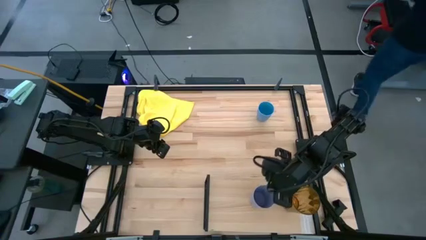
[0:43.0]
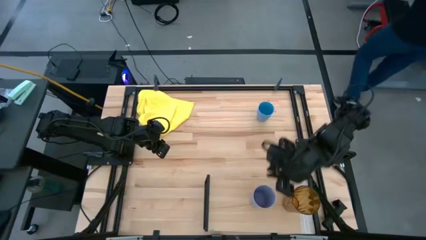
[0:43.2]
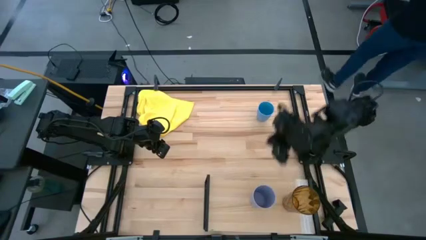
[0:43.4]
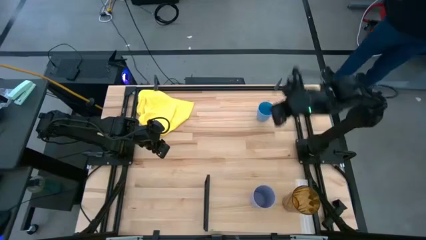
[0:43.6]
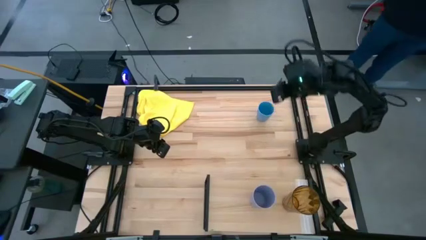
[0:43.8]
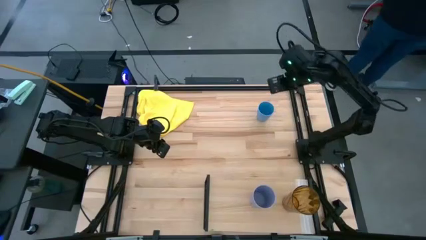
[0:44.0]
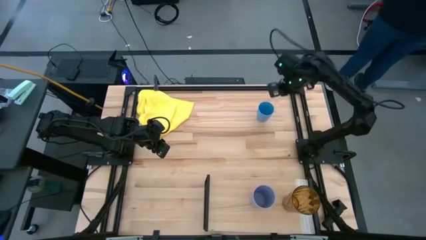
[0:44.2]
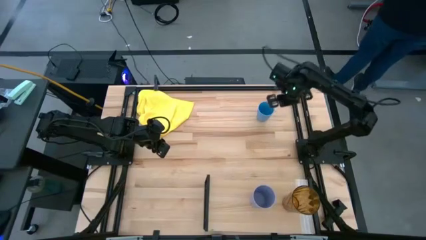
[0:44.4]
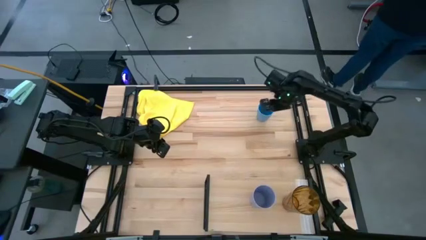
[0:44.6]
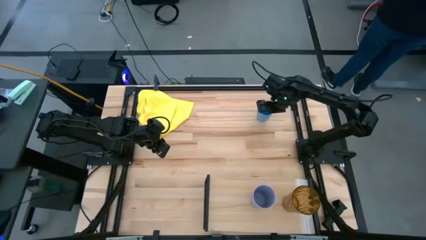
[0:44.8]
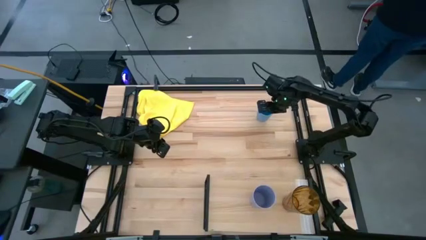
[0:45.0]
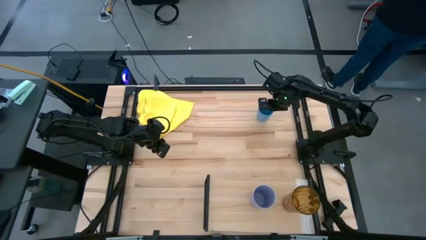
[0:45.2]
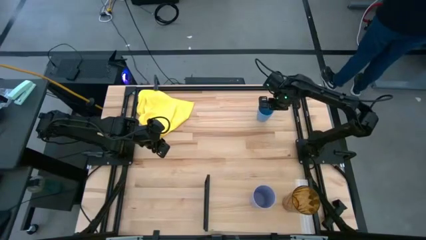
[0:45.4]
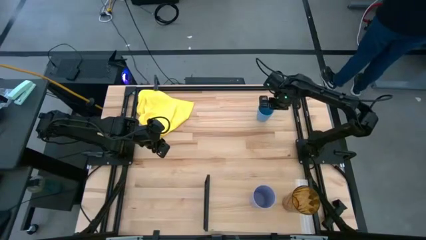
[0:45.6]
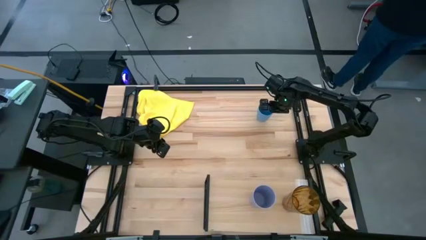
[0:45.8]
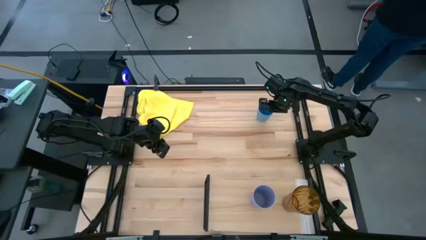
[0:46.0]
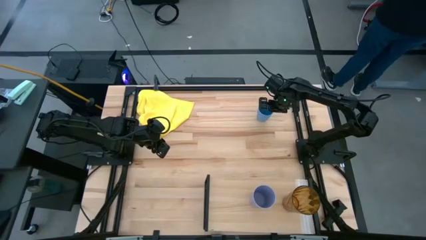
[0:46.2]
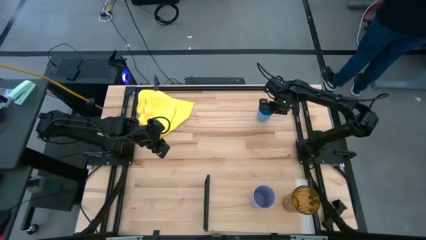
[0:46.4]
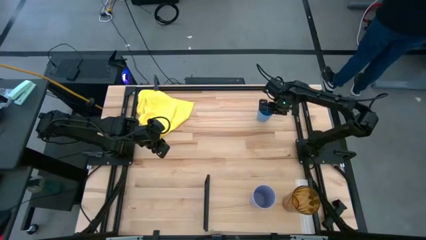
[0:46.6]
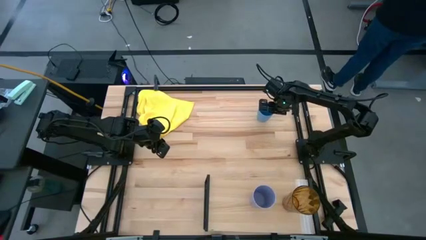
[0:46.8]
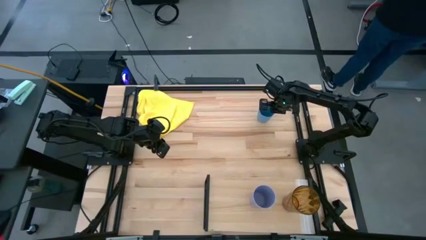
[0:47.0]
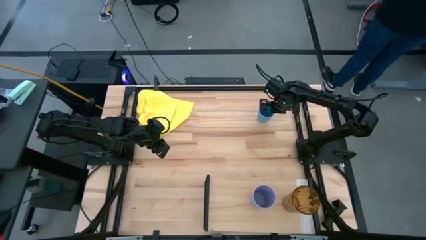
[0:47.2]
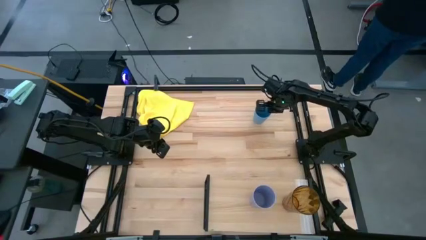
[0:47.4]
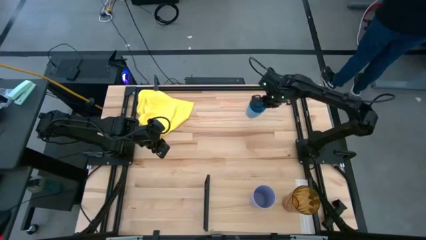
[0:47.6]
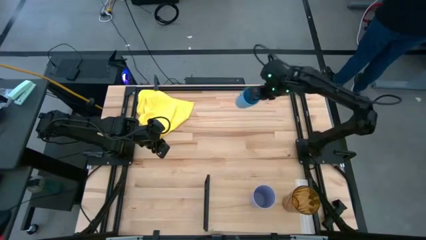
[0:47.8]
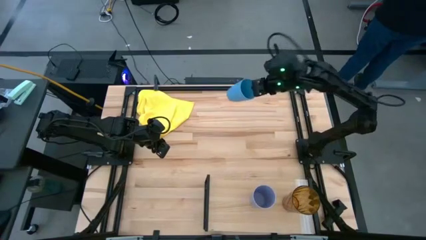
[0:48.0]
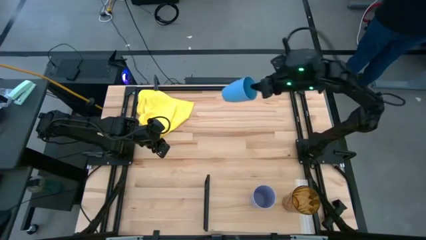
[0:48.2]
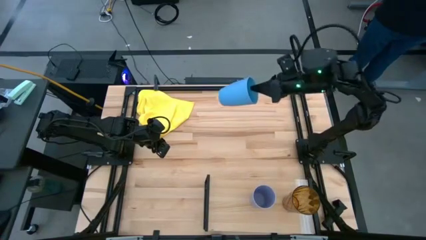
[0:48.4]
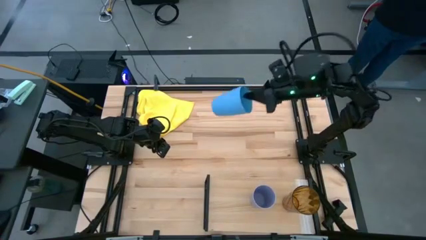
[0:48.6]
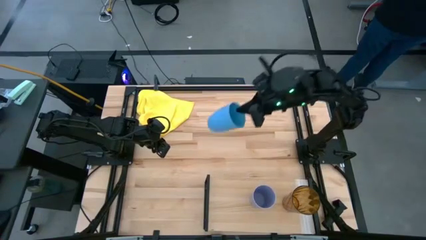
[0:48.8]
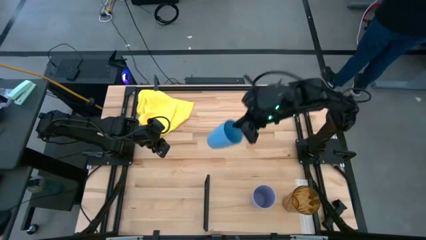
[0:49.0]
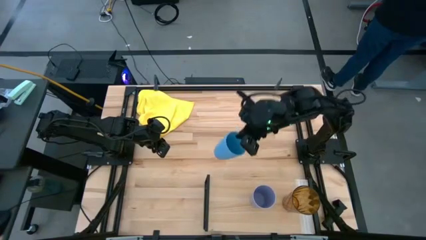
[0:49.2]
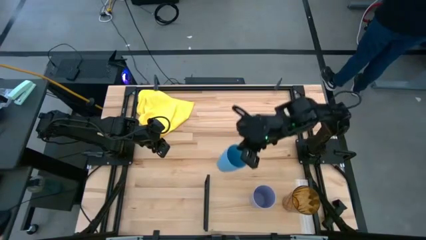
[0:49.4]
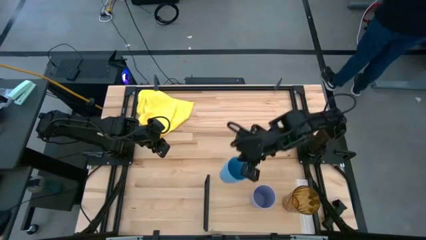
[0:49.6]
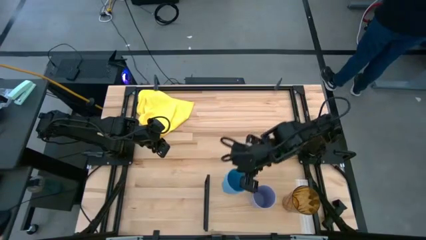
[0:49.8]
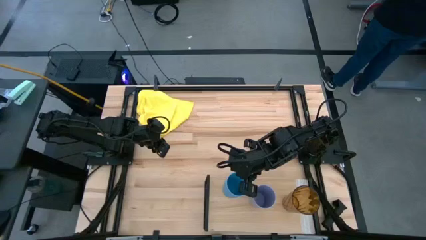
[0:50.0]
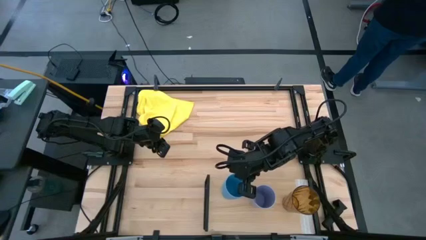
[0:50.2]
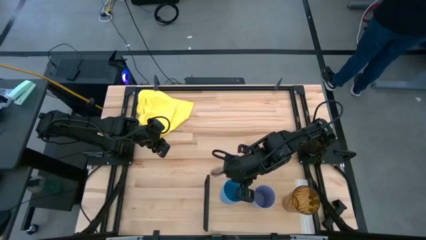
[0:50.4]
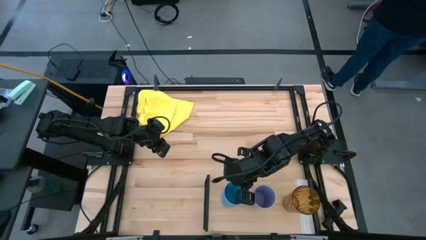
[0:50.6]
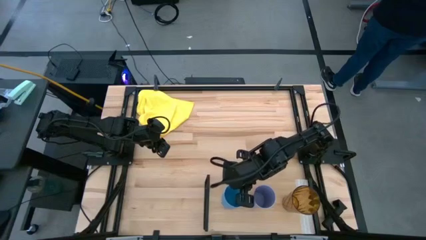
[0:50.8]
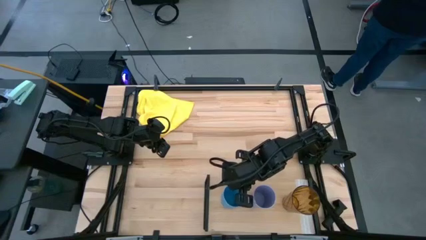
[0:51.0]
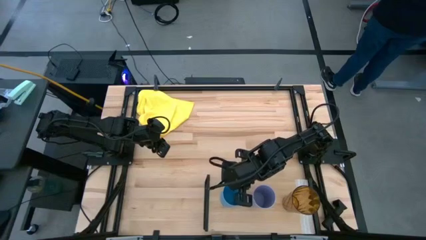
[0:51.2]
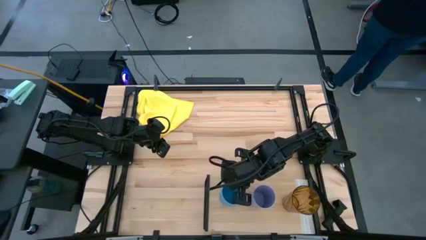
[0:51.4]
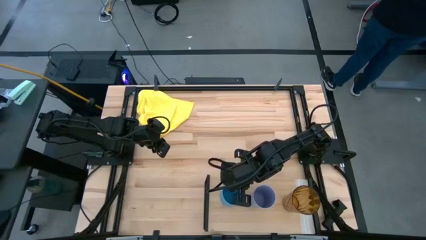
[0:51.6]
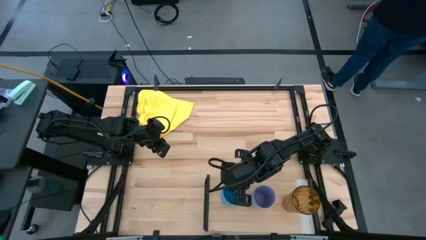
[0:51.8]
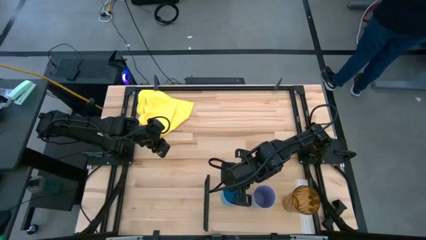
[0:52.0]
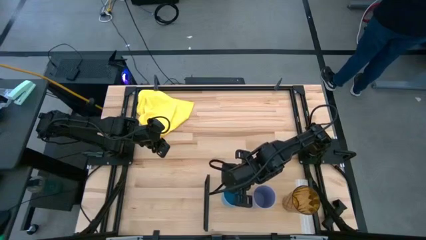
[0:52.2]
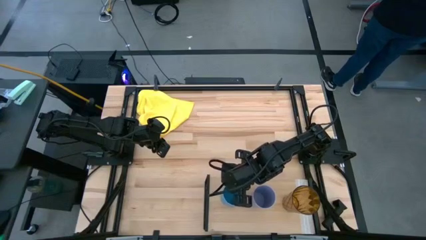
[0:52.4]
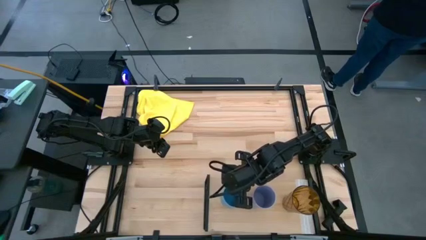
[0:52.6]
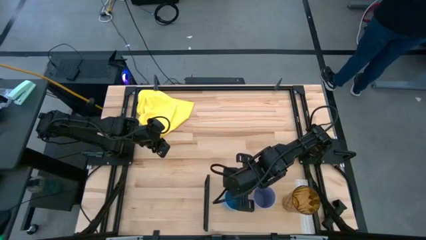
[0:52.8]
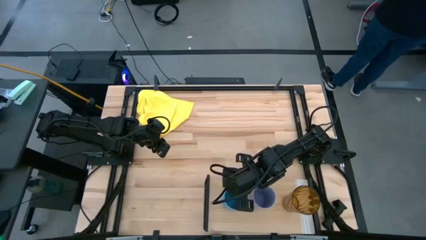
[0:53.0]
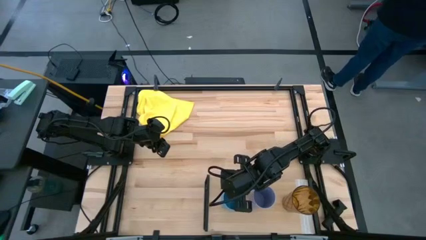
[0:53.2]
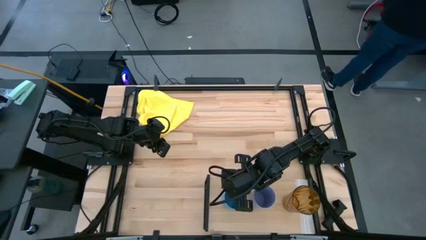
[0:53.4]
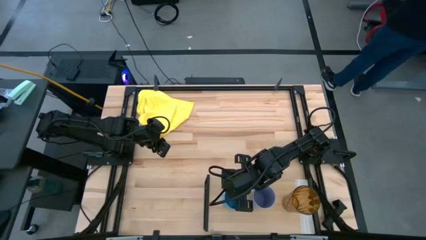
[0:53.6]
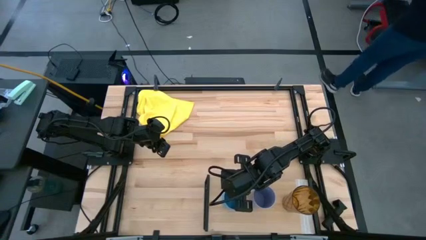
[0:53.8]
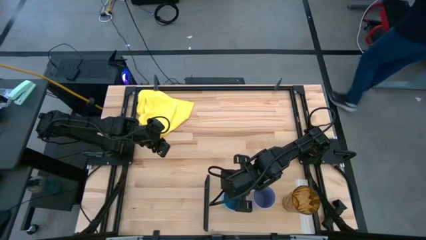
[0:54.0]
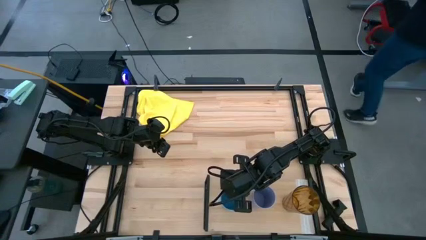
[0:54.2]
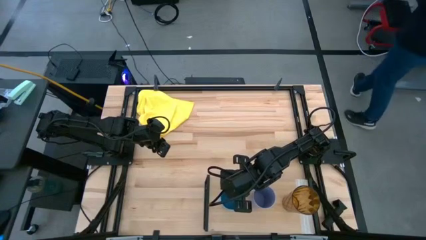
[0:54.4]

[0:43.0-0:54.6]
Task: Stack small to large cups/mugs on shelf
Put the blue cup on the shelf

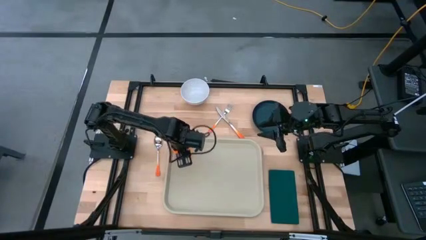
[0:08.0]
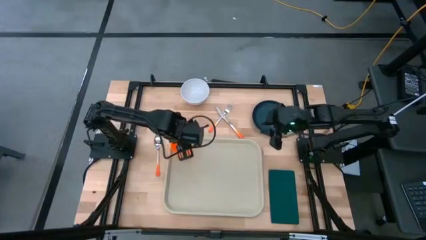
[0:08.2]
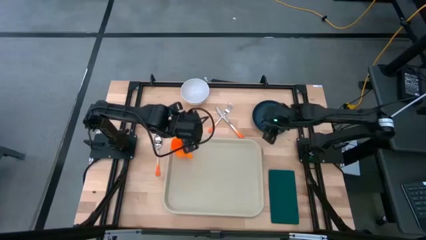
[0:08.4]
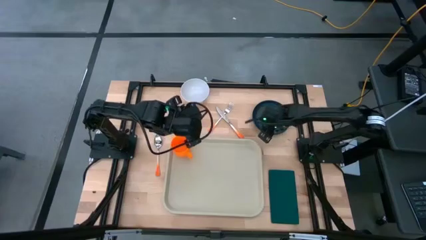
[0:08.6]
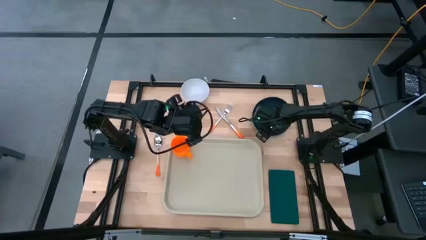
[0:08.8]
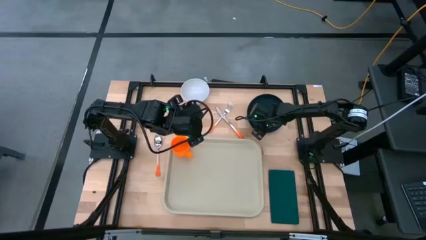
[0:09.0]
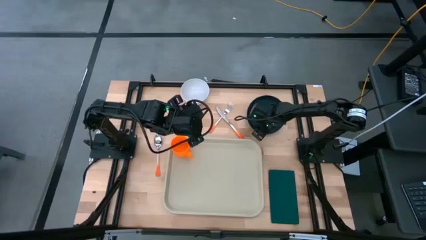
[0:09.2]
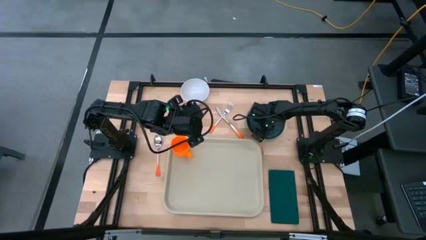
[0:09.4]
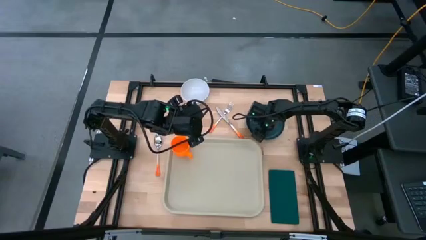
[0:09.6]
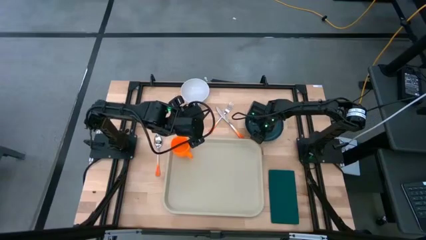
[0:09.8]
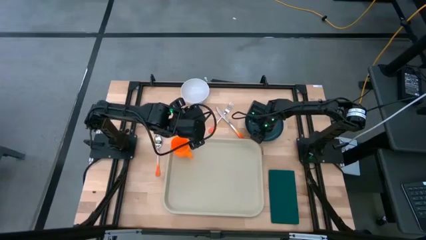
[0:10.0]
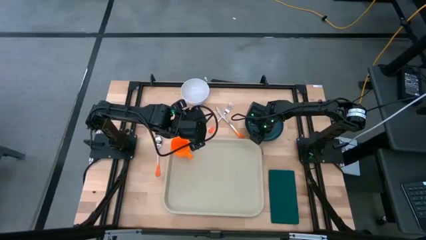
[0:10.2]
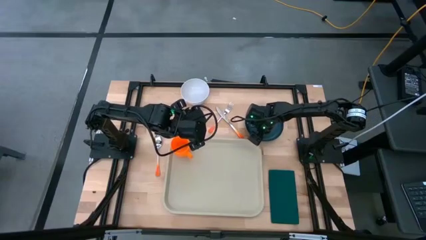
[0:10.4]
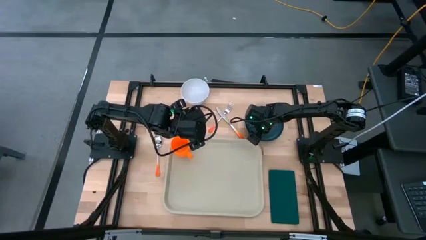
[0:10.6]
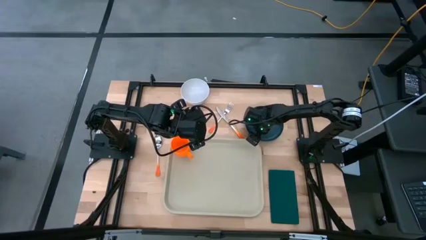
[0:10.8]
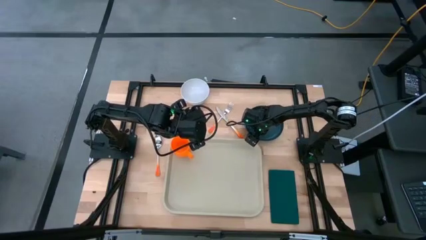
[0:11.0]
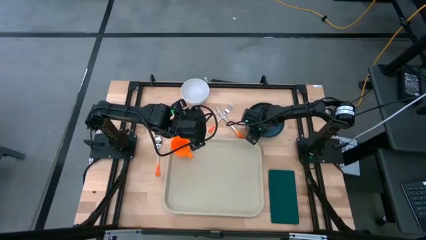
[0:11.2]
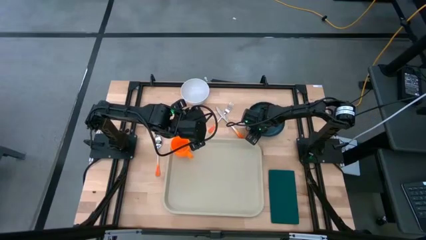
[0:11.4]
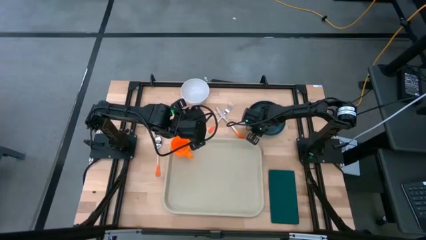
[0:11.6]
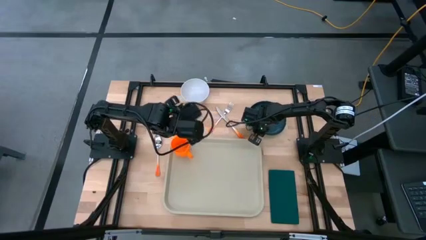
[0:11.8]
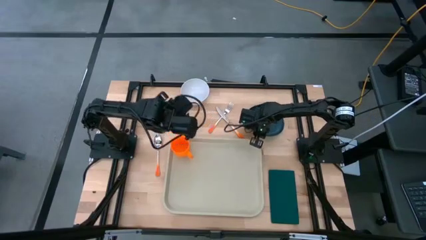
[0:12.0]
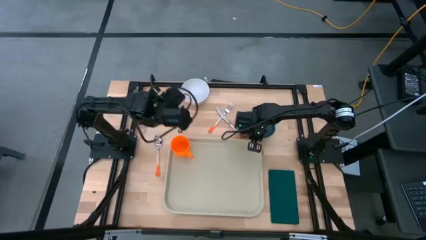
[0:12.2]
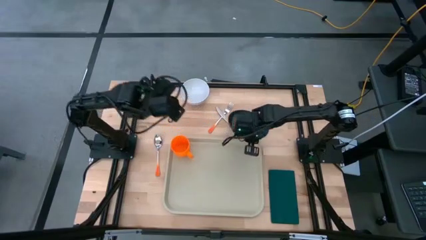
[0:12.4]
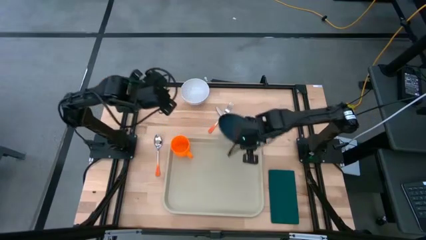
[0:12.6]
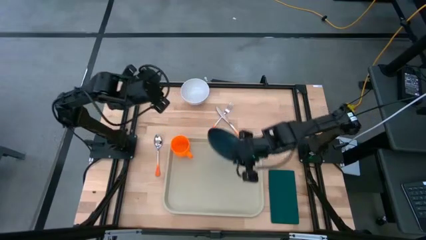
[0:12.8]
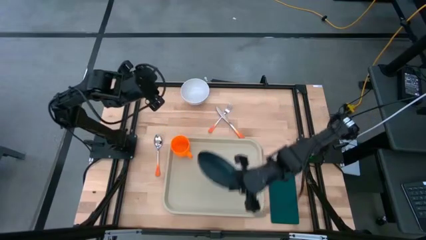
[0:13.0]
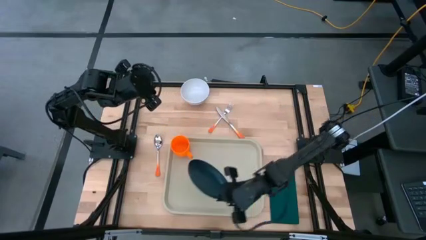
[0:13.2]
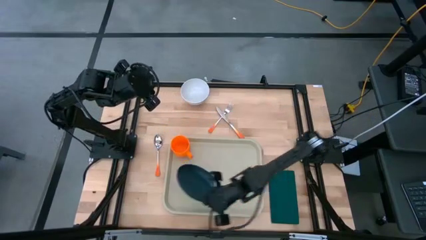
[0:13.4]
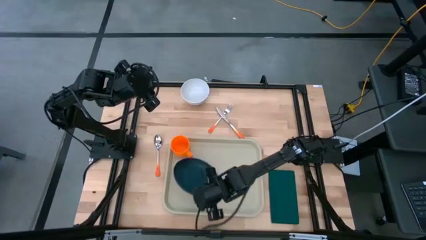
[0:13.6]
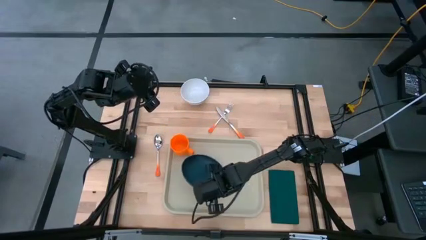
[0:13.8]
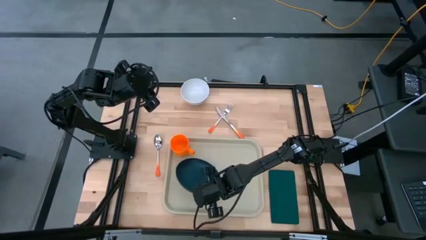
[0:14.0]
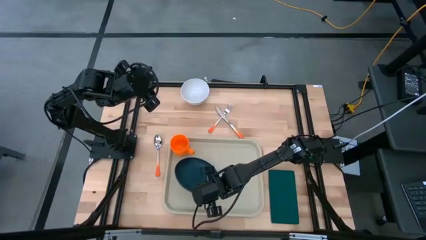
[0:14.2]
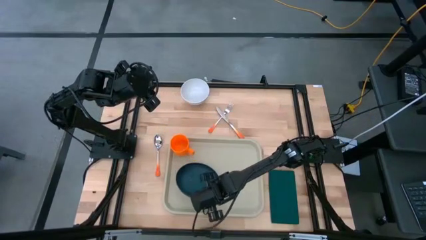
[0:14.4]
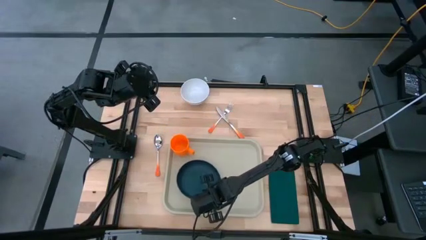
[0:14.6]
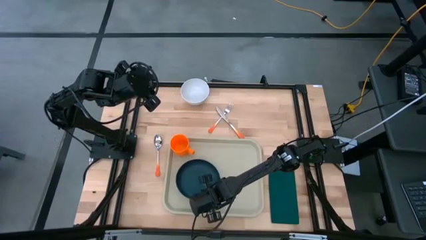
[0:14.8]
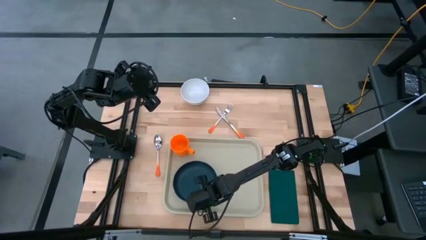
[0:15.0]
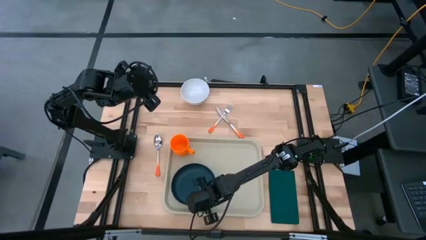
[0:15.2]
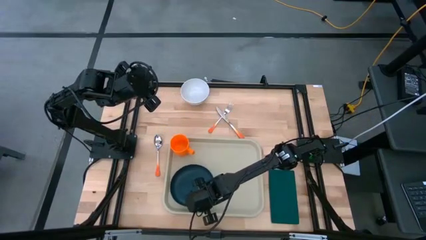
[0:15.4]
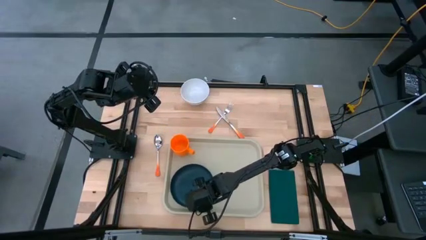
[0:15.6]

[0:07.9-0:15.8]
Task: Set up tray
Put the black plate under the orange mug on the brown tray
